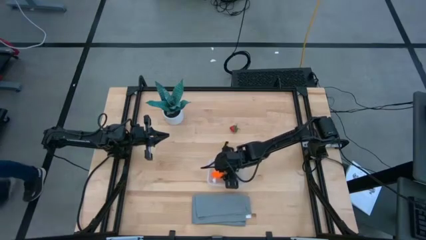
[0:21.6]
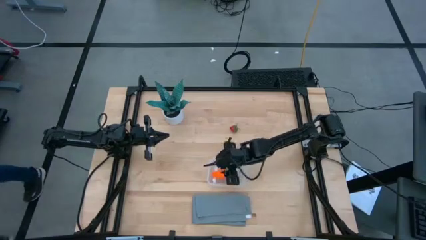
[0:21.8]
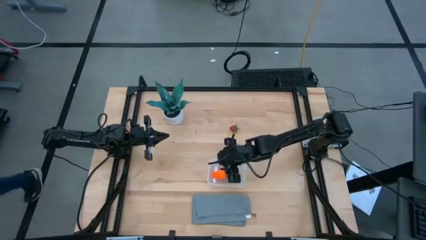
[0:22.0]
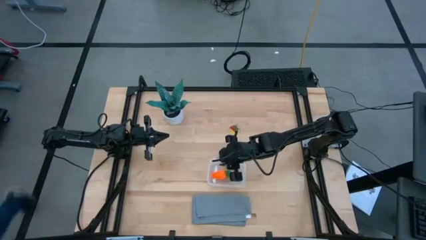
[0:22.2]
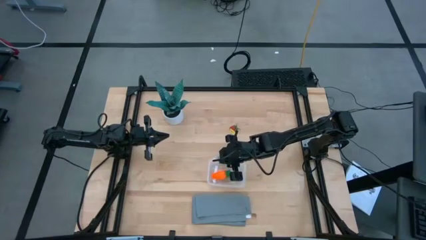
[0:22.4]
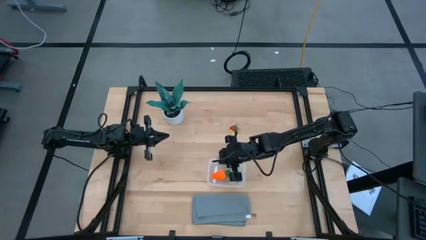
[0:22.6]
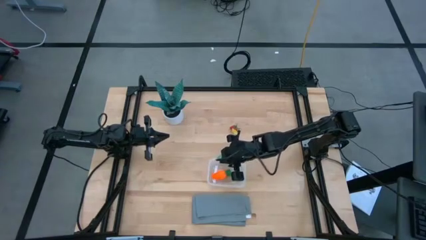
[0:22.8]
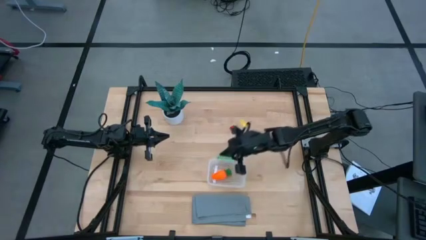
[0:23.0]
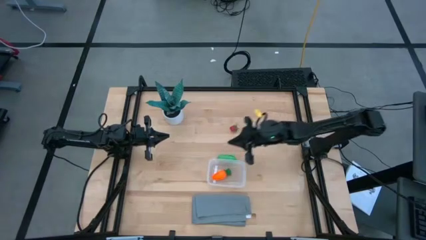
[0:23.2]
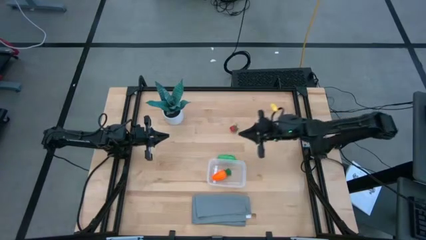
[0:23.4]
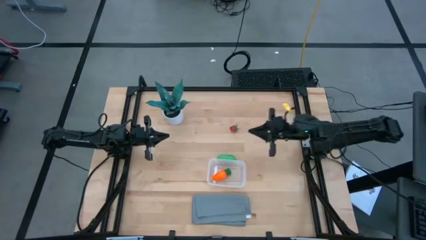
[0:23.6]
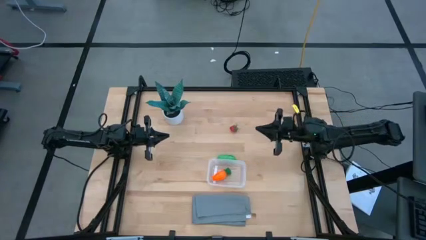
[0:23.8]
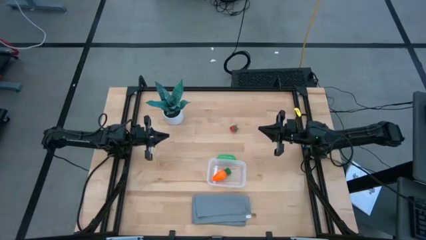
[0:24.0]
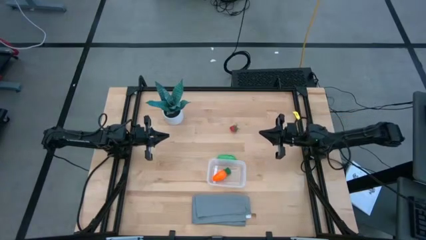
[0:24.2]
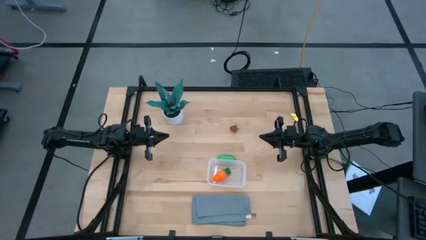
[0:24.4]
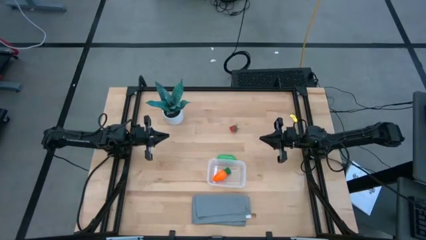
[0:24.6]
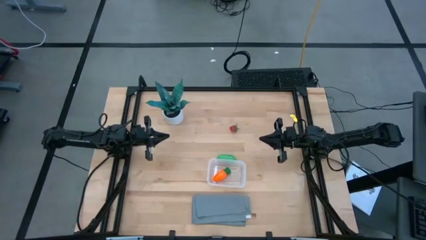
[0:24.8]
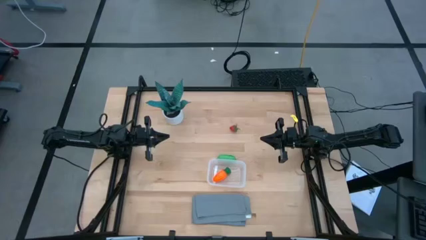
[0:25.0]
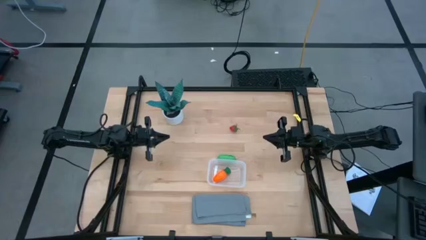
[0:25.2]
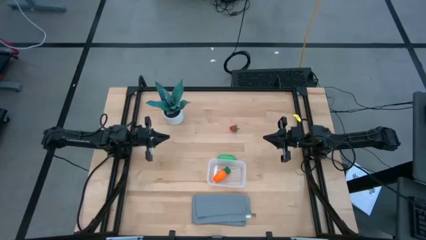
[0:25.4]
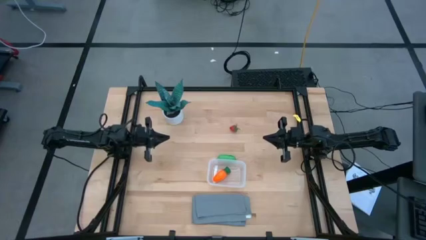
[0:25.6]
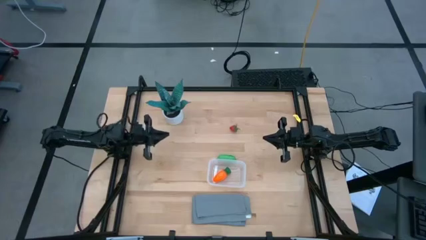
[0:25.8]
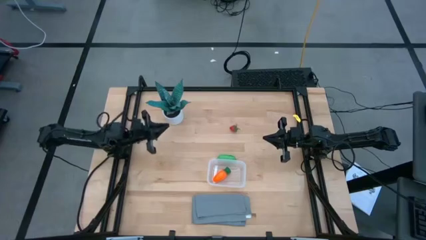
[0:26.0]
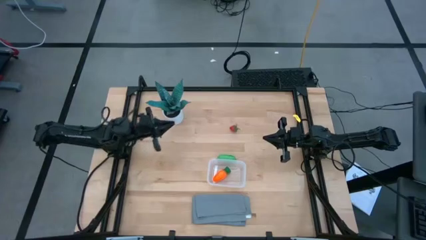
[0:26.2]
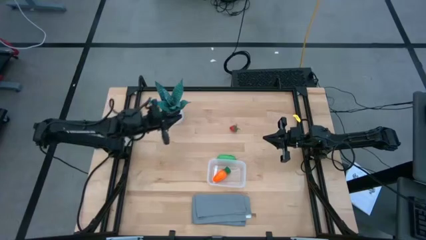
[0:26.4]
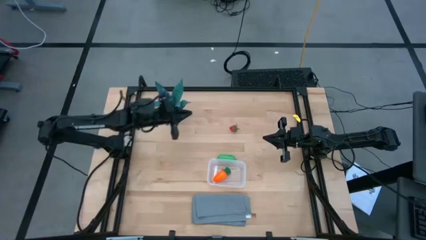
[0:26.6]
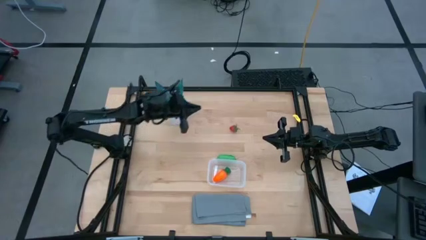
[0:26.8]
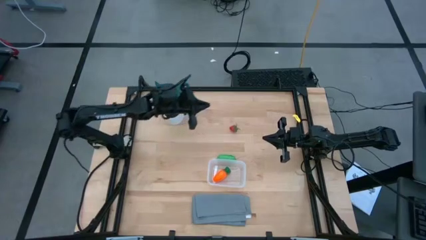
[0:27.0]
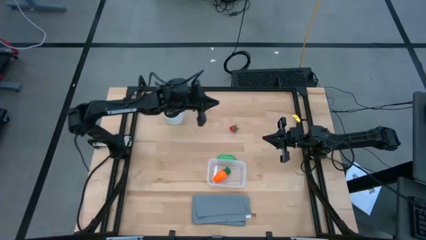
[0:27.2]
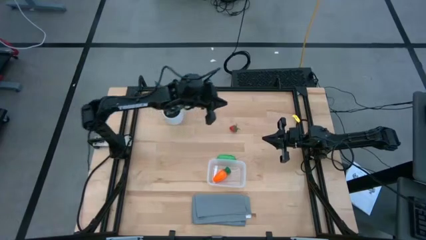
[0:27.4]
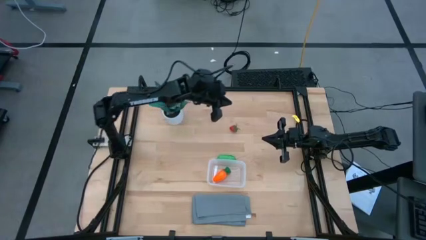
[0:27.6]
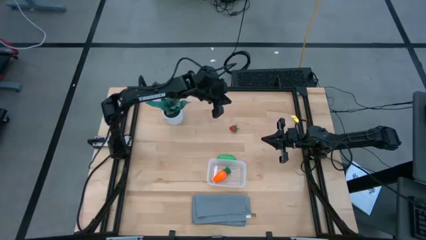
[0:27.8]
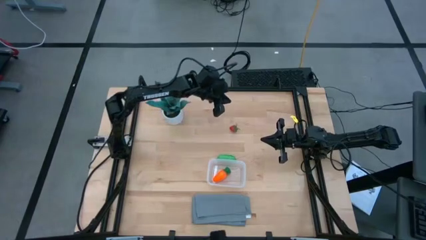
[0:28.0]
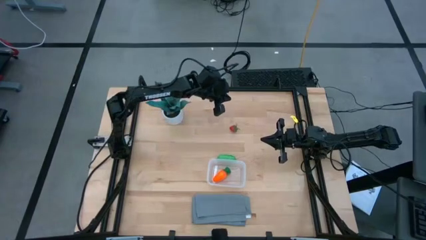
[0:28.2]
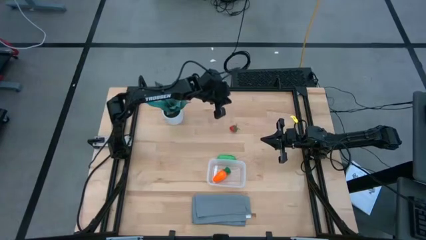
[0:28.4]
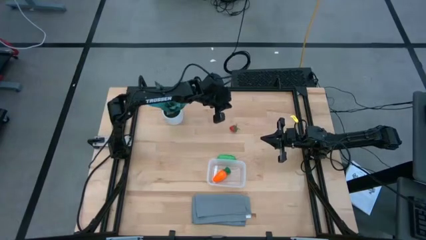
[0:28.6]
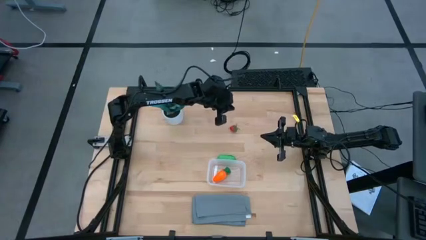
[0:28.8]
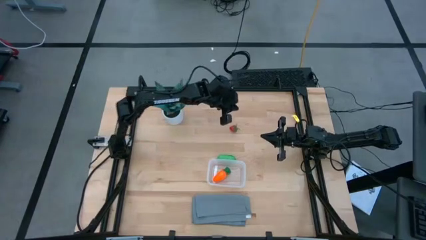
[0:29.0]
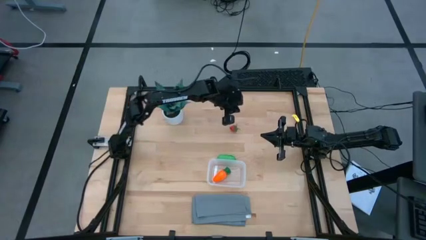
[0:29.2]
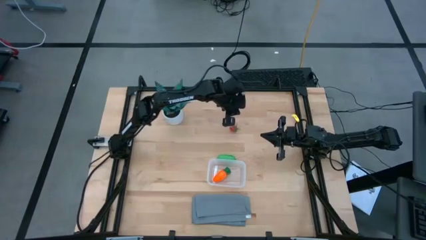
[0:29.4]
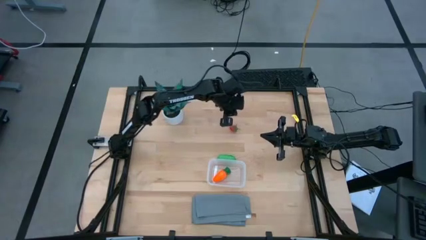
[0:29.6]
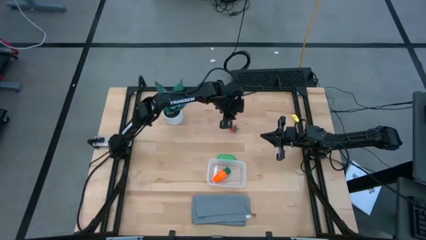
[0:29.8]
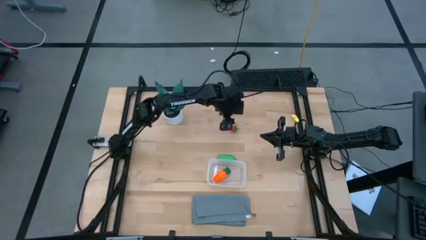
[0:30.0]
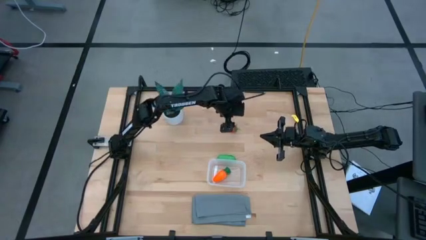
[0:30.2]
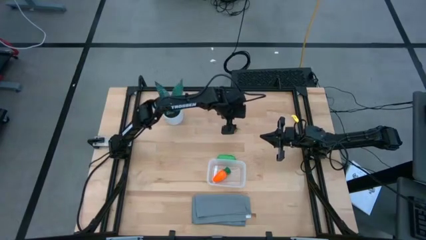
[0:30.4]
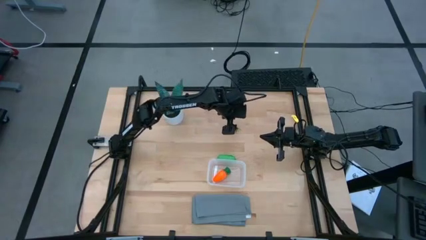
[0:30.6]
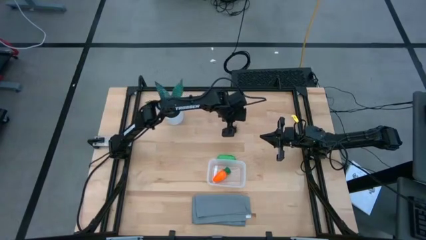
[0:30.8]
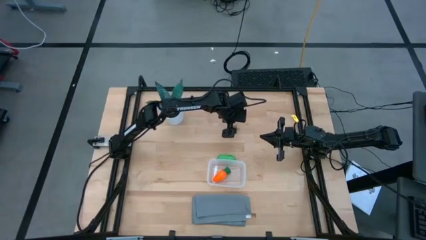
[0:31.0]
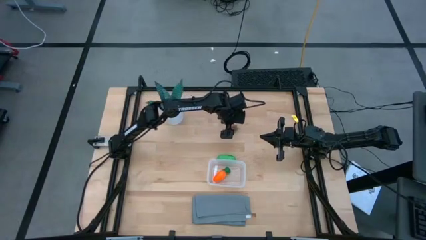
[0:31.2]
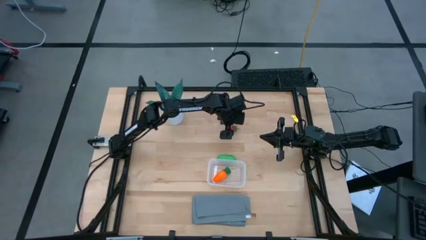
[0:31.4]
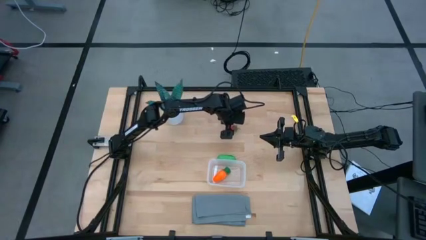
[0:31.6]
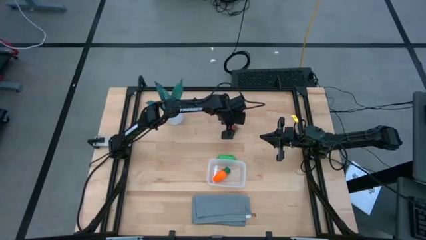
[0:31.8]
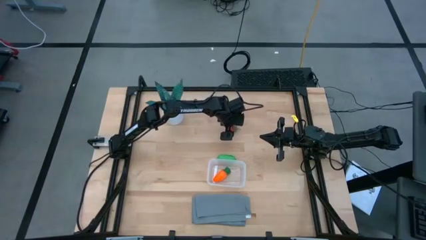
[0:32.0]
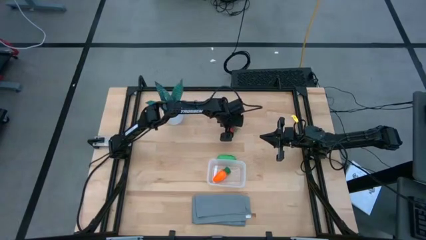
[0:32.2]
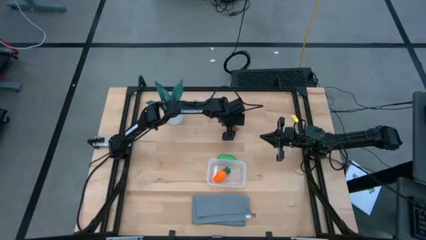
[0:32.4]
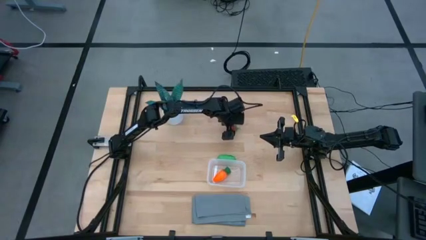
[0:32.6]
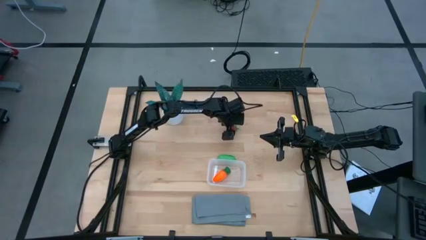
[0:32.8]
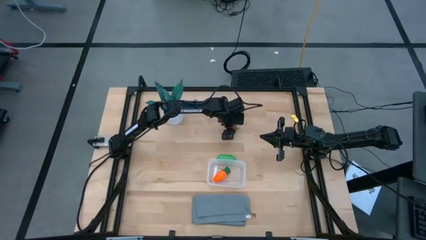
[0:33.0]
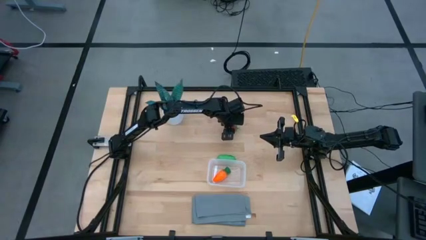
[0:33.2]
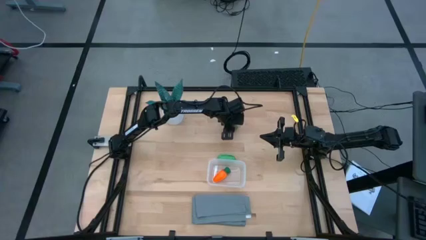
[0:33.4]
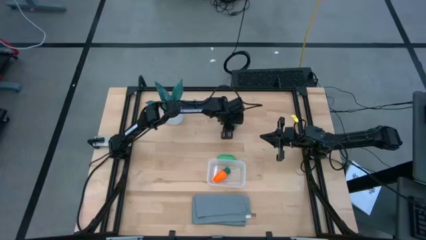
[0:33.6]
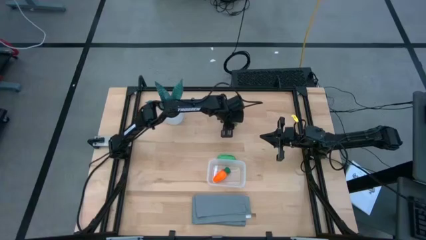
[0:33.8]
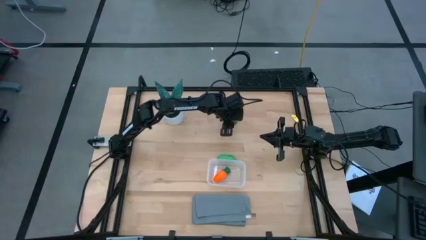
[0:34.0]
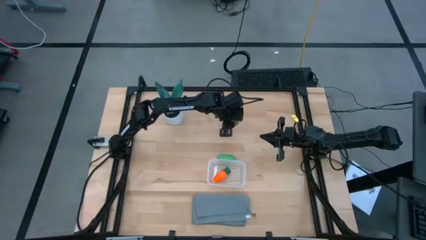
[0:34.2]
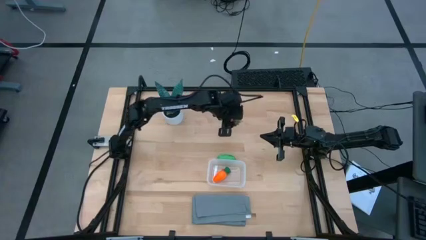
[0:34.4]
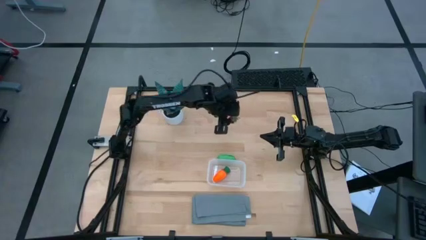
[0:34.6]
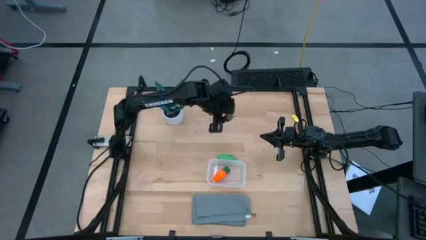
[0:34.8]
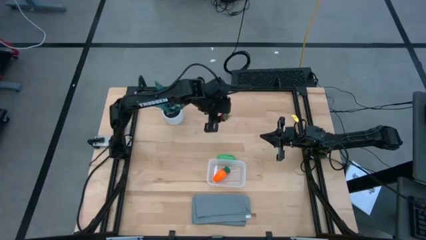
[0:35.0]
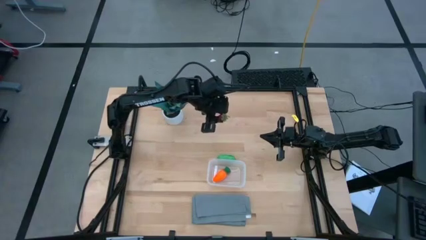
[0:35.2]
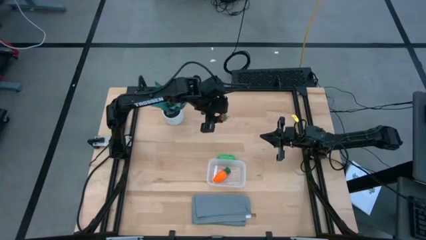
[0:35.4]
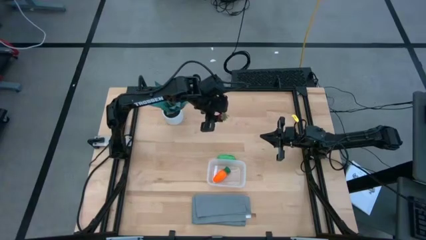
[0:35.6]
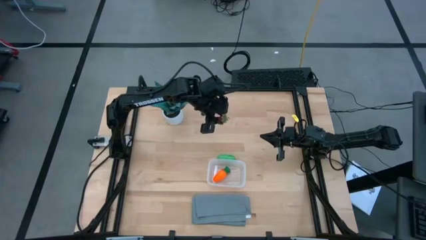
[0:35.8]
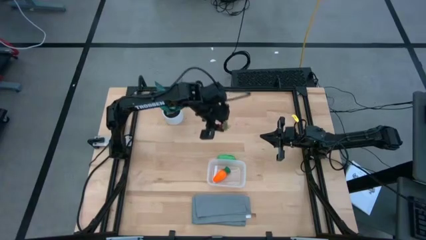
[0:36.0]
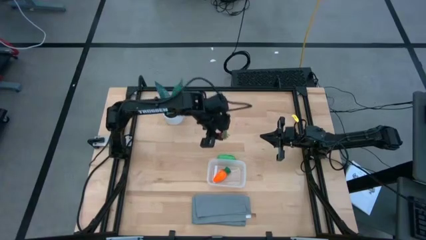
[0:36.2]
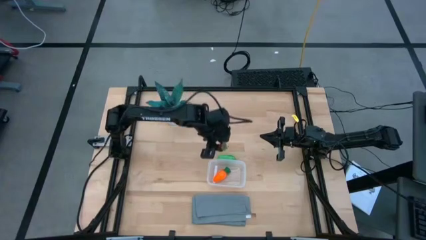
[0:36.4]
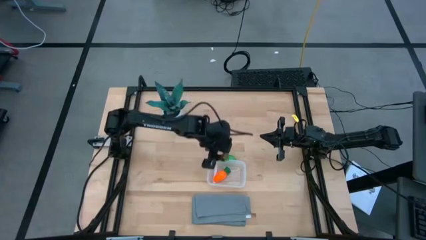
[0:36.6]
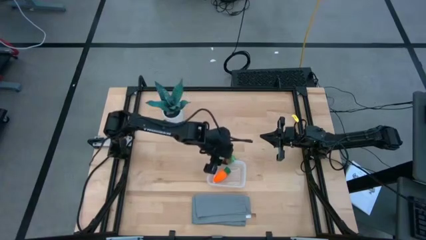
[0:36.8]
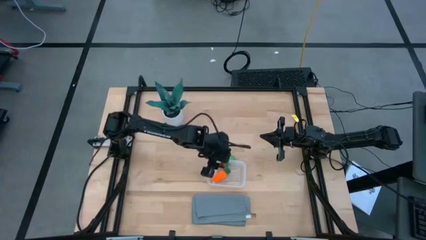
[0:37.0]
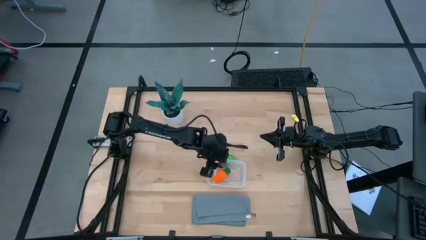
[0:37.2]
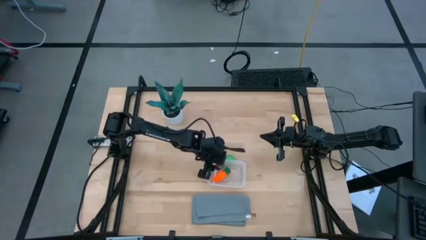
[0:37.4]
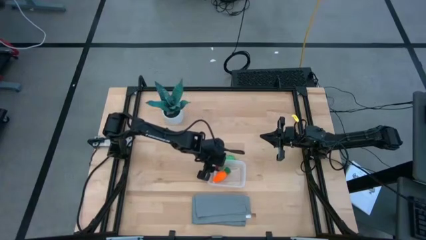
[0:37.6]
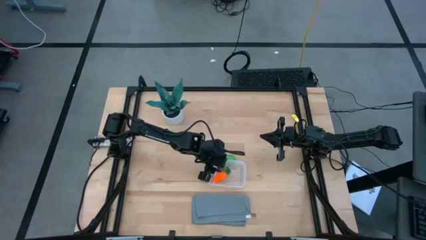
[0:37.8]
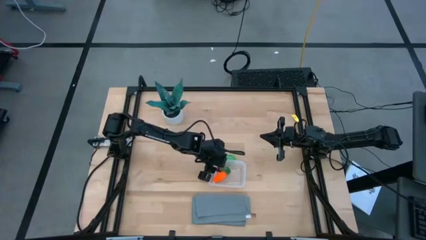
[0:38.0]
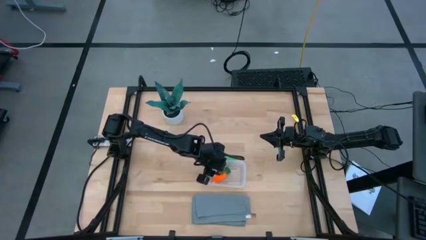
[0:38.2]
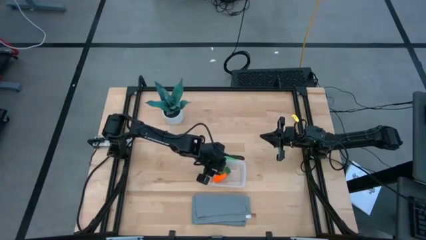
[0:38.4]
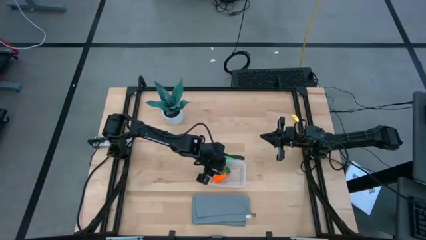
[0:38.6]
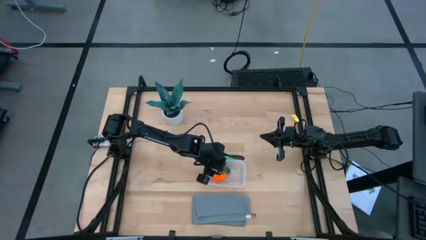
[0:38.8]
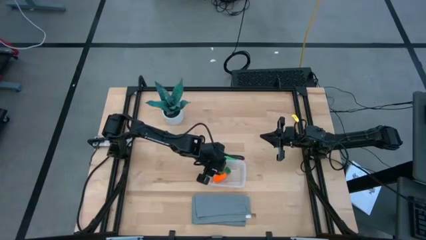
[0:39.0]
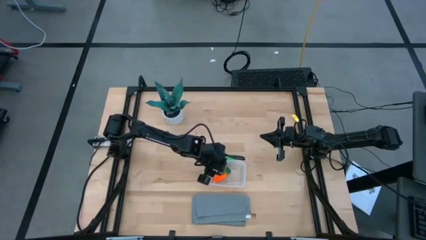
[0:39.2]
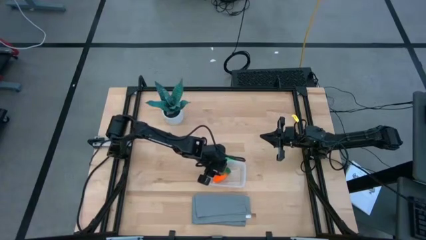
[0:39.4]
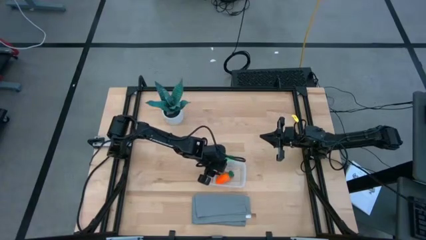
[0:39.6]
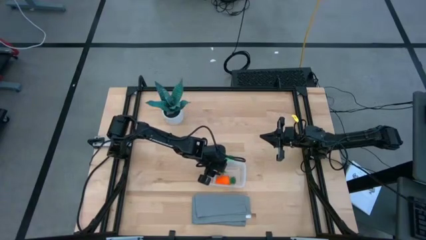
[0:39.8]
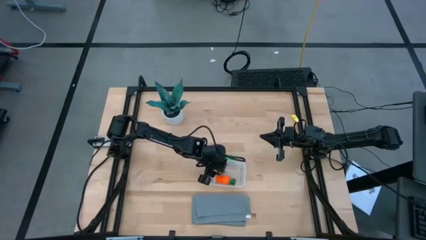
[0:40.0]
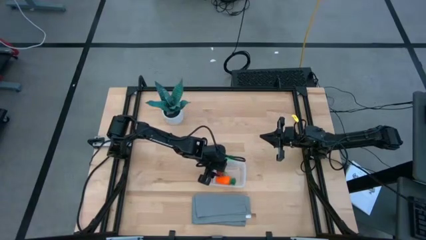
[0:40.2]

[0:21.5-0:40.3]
Task: Pick and placing Produce into tupperware
Put the strawberry into the transparent bin
